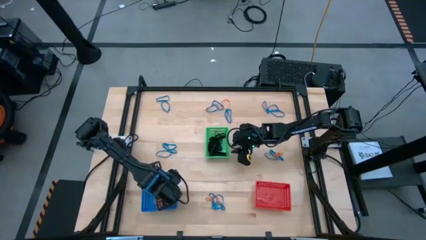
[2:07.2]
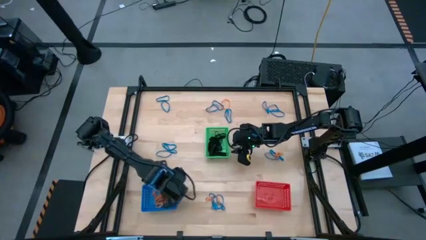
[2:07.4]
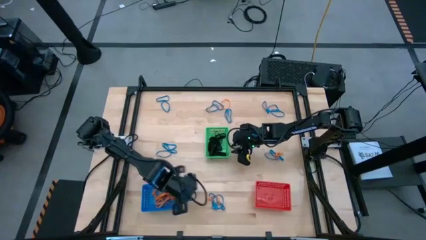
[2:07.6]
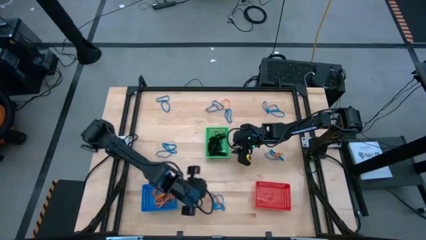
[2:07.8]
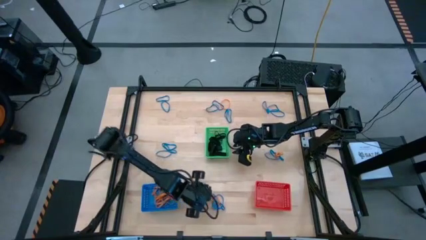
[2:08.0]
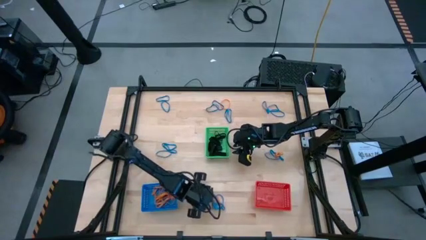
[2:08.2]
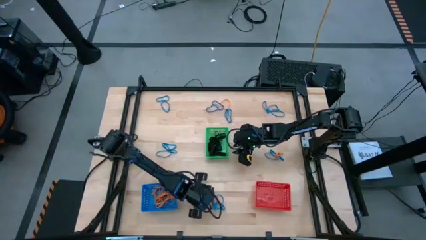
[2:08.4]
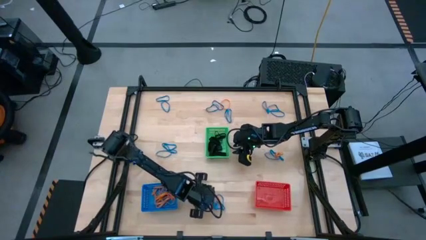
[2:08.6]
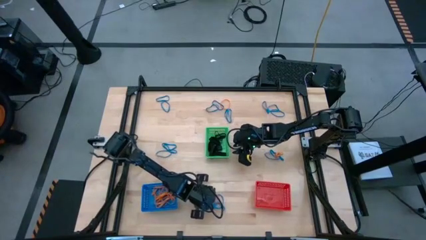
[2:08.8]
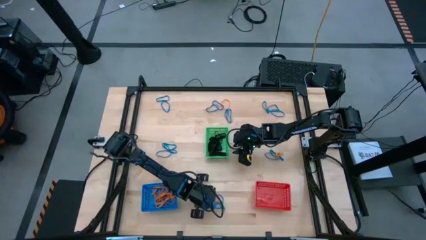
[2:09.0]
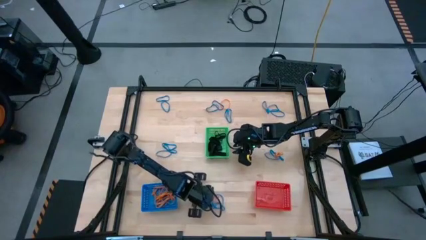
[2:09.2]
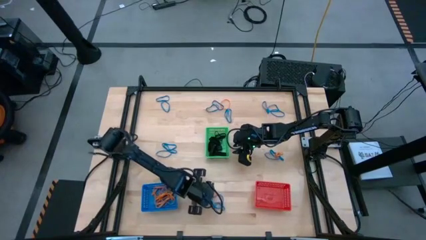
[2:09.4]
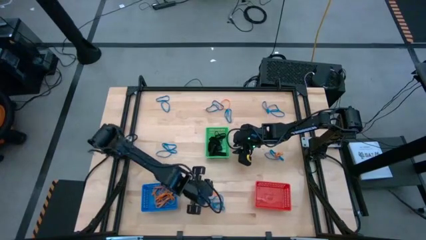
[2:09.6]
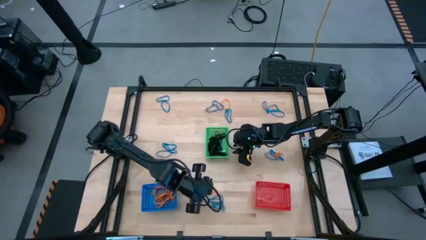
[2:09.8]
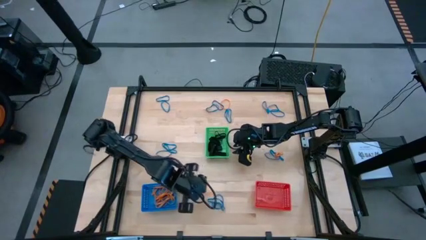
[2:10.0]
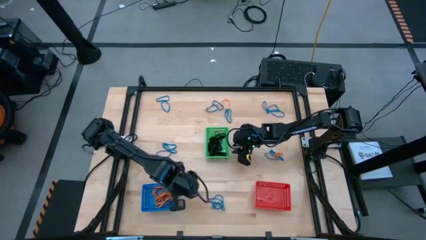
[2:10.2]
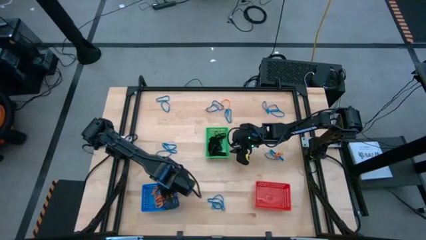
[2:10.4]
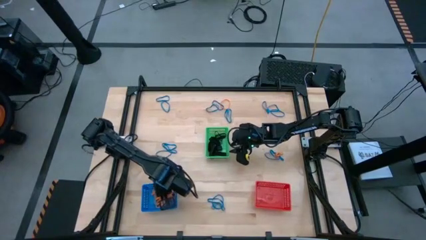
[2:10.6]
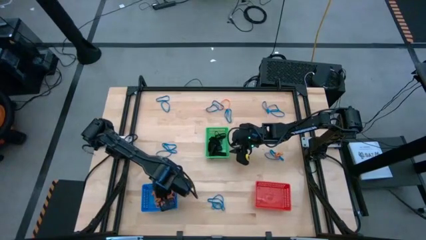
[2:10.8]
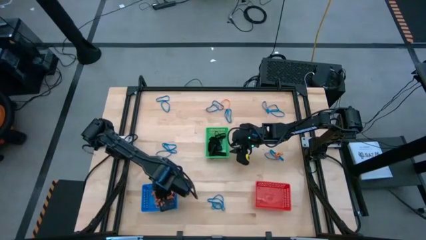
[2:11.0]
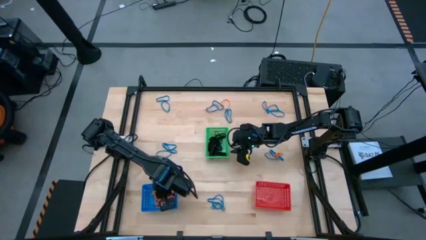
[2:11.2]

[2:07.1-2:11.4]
Task: Sort rubber bands into baskets
Put the orange rubber band into the blue bin

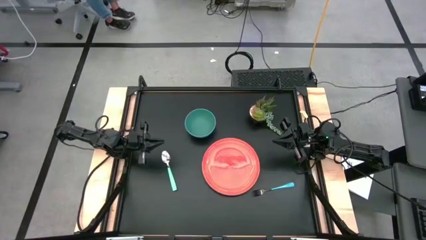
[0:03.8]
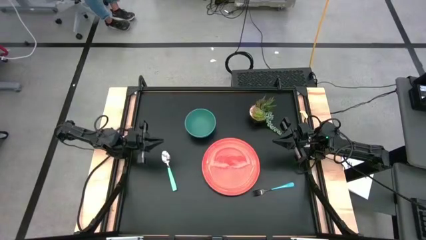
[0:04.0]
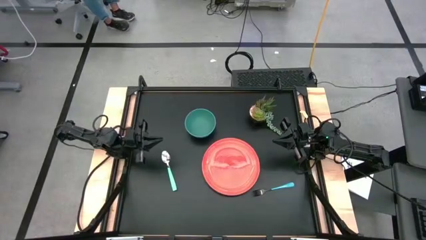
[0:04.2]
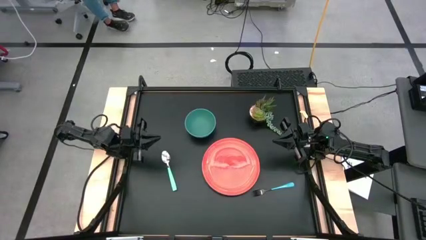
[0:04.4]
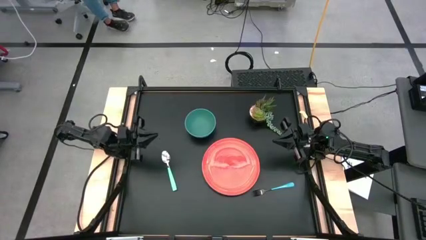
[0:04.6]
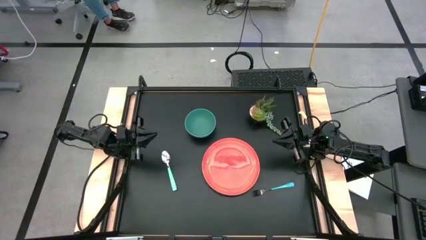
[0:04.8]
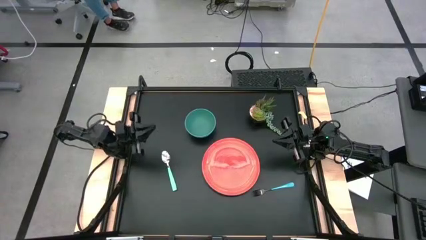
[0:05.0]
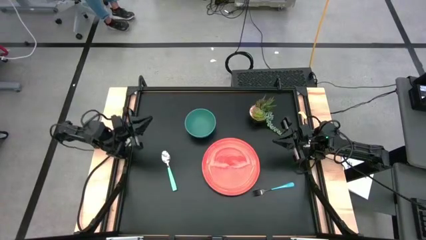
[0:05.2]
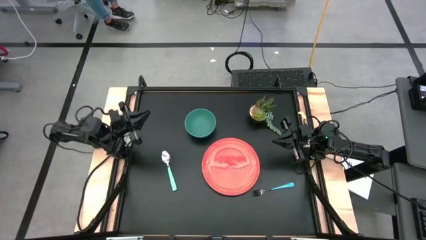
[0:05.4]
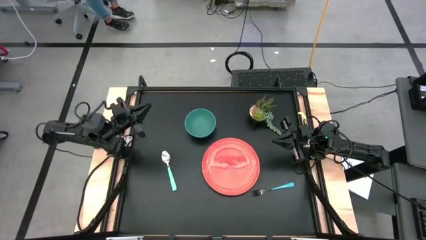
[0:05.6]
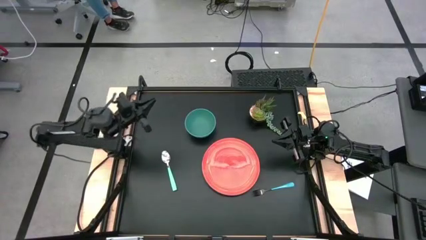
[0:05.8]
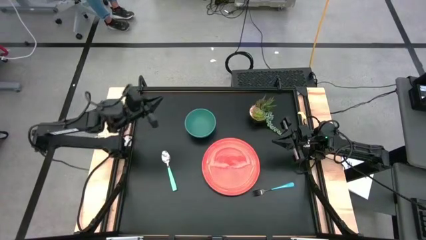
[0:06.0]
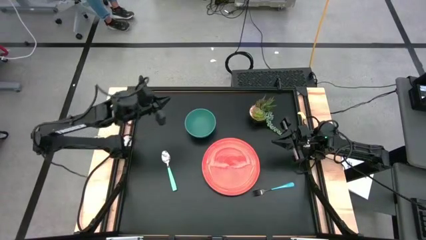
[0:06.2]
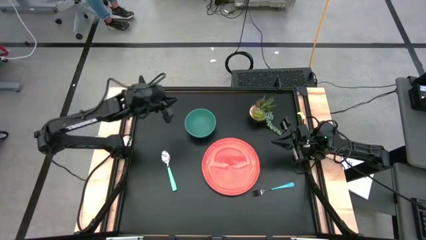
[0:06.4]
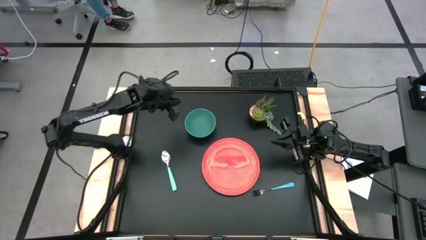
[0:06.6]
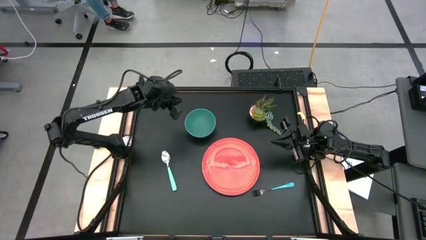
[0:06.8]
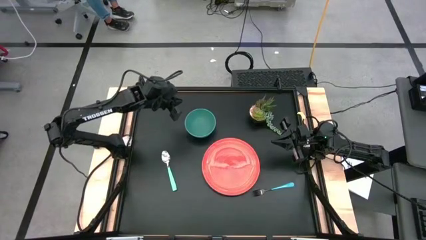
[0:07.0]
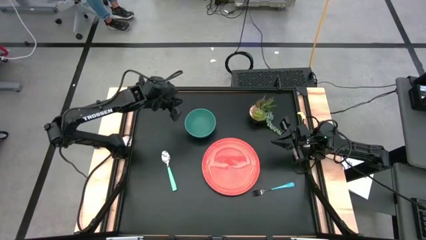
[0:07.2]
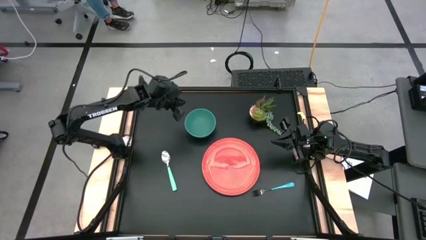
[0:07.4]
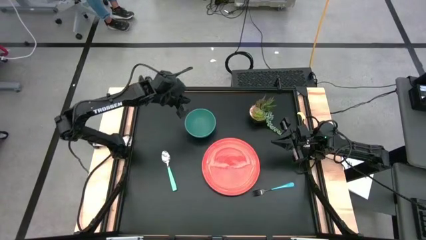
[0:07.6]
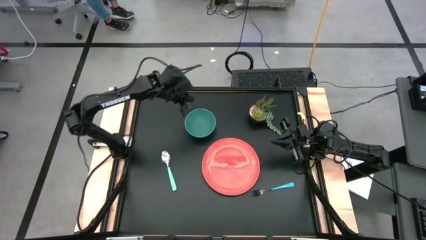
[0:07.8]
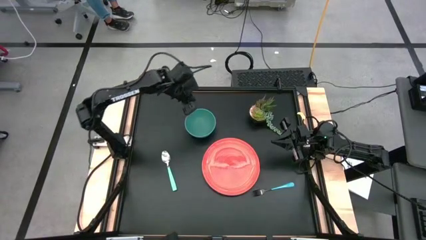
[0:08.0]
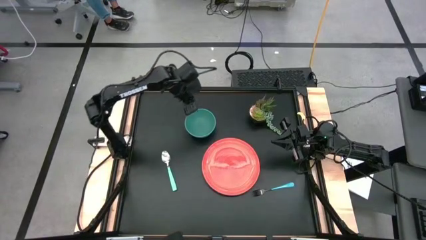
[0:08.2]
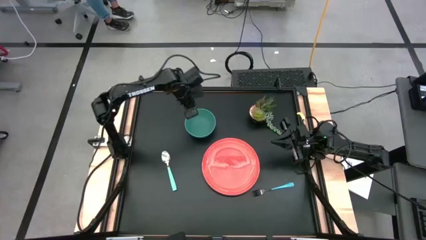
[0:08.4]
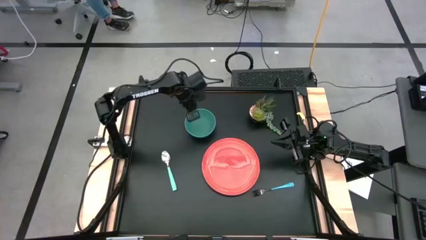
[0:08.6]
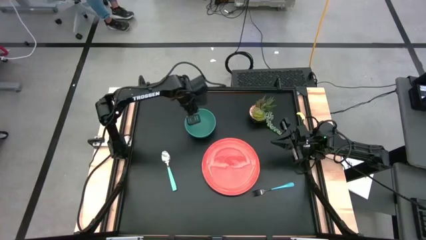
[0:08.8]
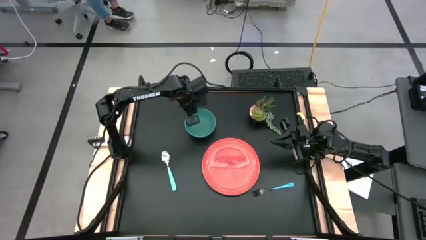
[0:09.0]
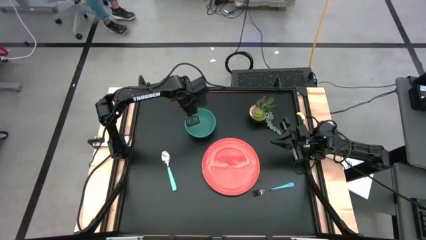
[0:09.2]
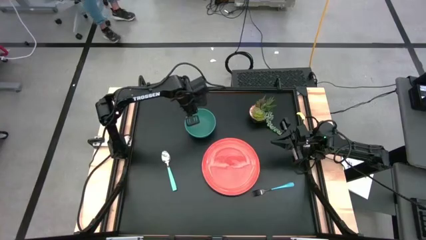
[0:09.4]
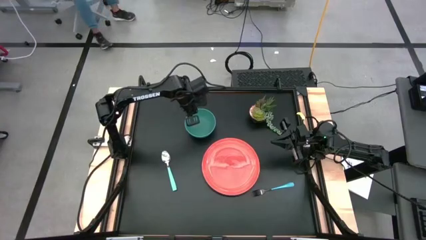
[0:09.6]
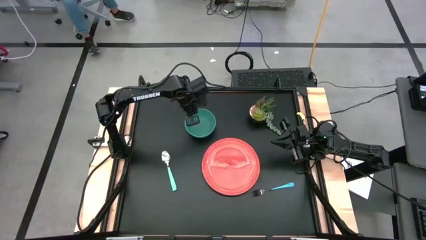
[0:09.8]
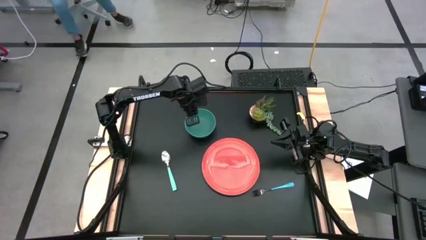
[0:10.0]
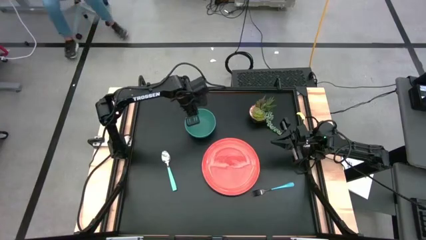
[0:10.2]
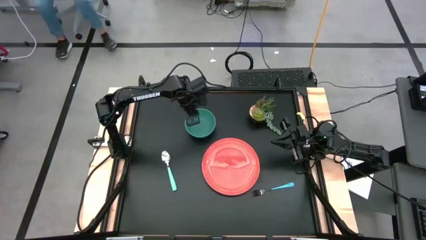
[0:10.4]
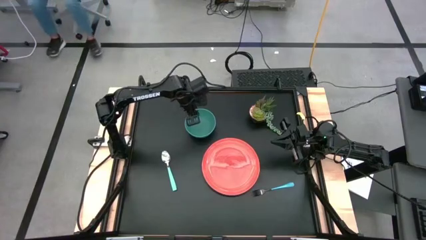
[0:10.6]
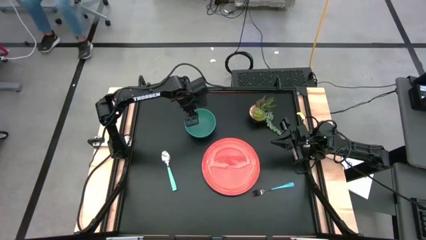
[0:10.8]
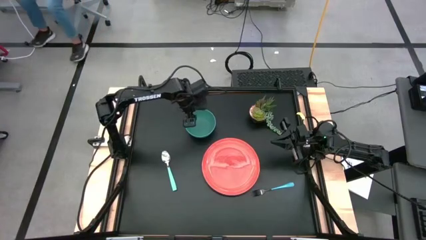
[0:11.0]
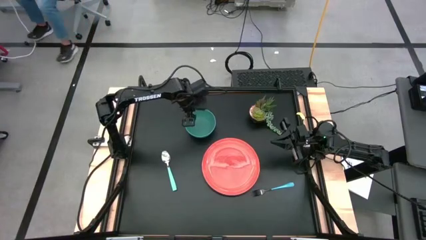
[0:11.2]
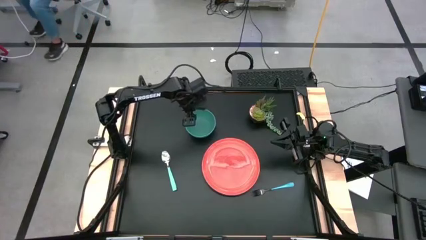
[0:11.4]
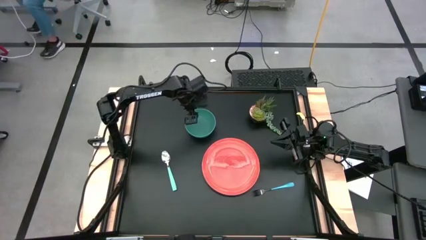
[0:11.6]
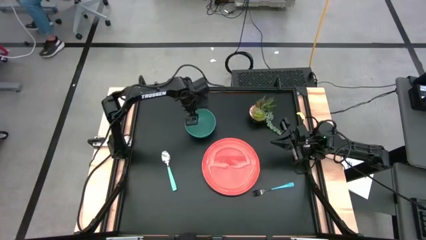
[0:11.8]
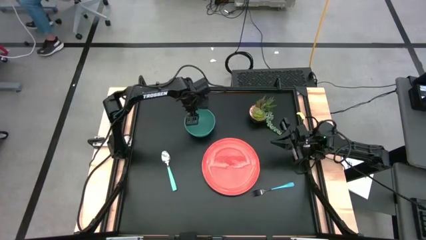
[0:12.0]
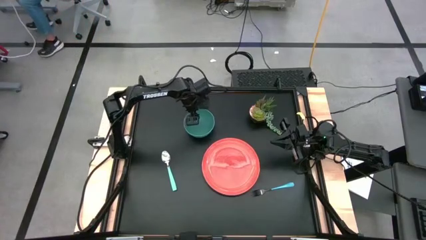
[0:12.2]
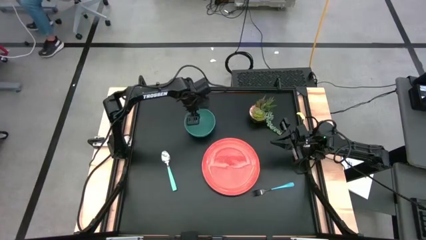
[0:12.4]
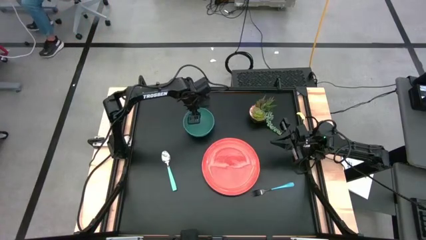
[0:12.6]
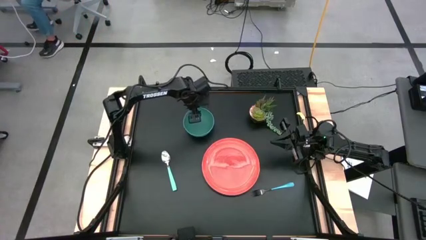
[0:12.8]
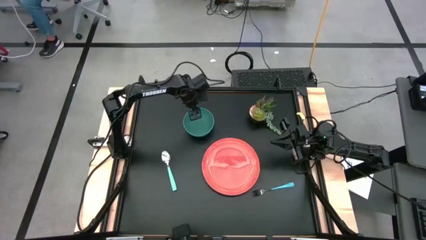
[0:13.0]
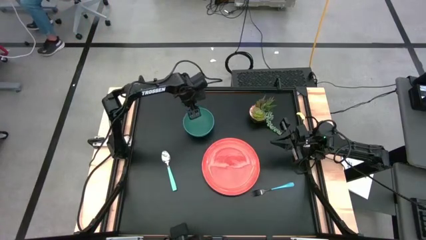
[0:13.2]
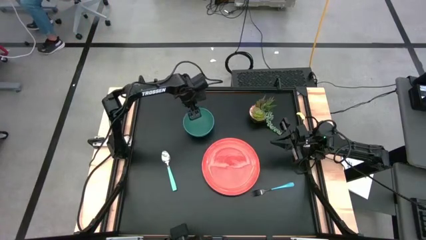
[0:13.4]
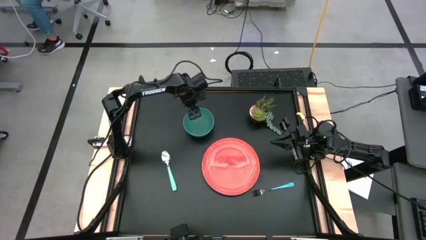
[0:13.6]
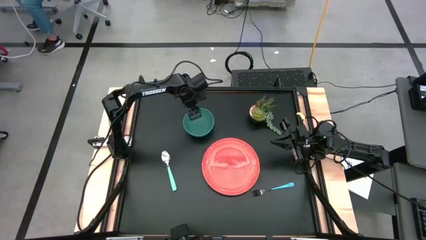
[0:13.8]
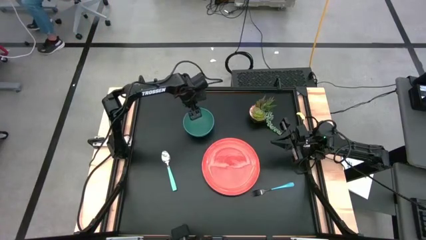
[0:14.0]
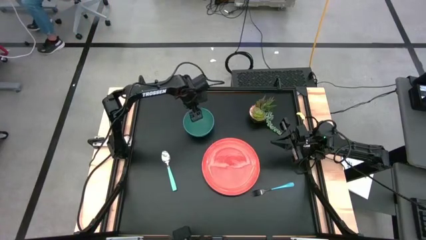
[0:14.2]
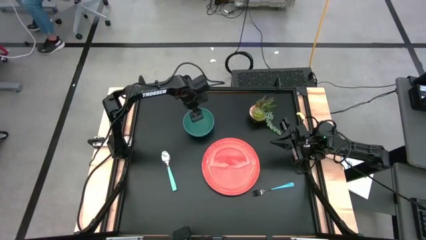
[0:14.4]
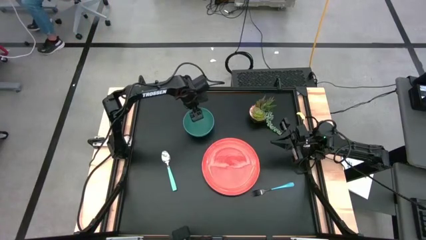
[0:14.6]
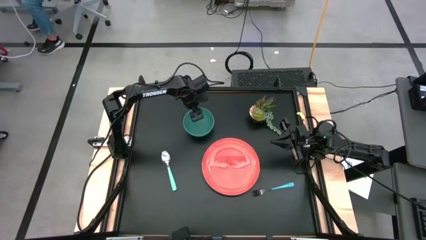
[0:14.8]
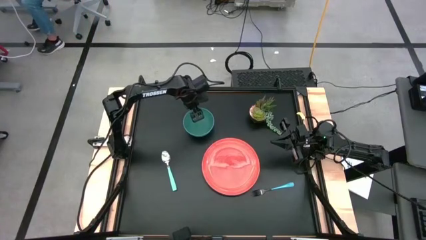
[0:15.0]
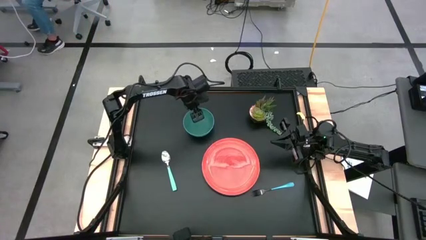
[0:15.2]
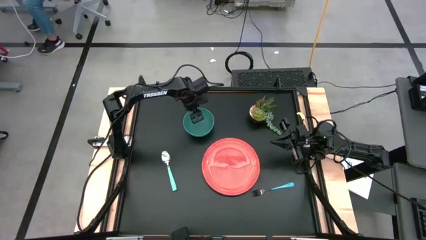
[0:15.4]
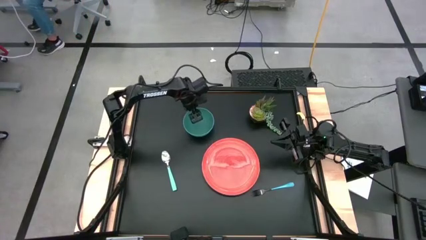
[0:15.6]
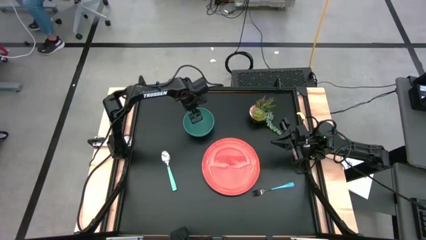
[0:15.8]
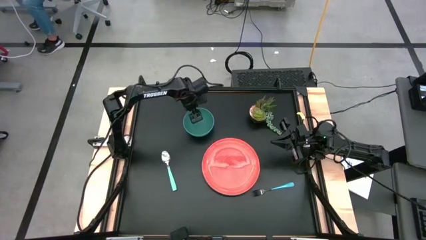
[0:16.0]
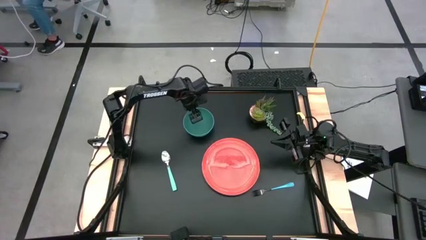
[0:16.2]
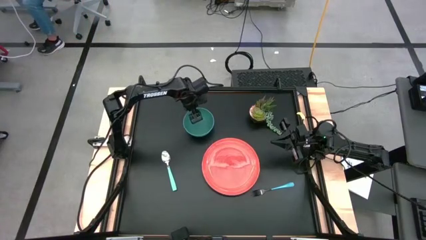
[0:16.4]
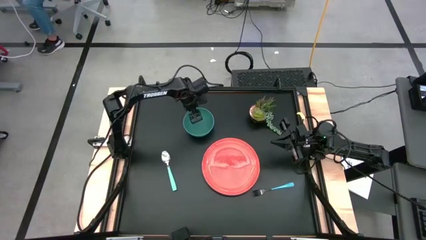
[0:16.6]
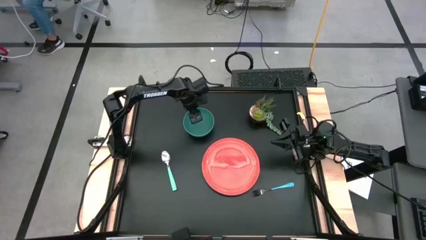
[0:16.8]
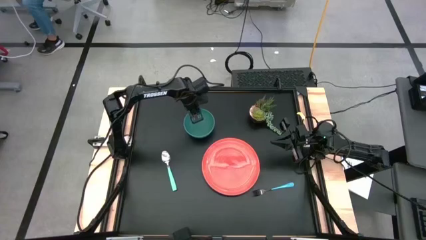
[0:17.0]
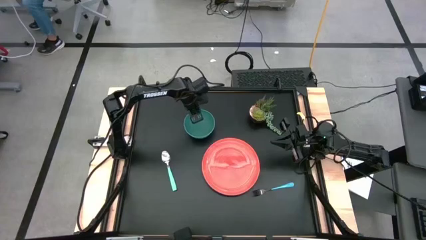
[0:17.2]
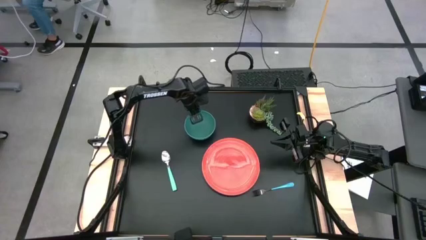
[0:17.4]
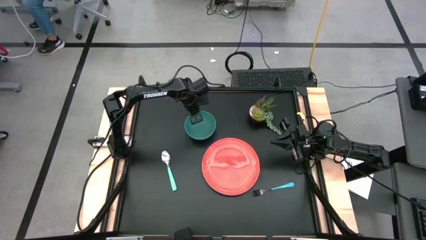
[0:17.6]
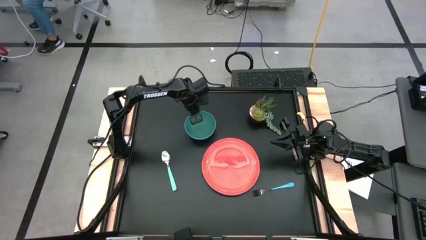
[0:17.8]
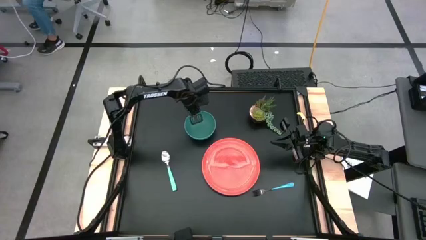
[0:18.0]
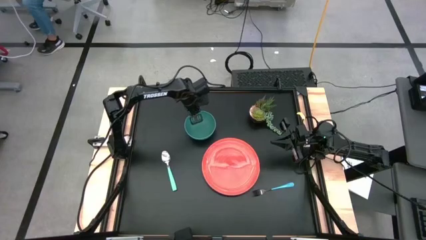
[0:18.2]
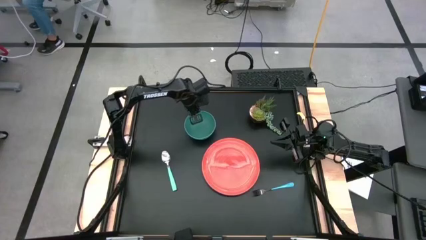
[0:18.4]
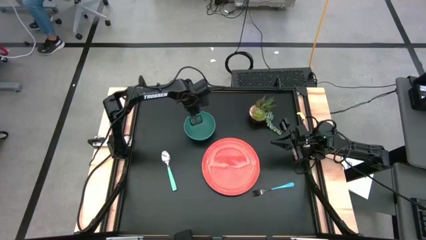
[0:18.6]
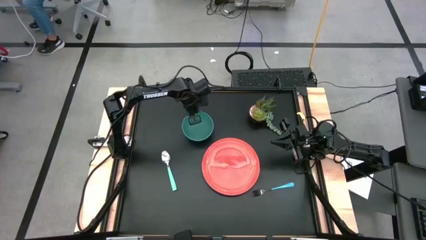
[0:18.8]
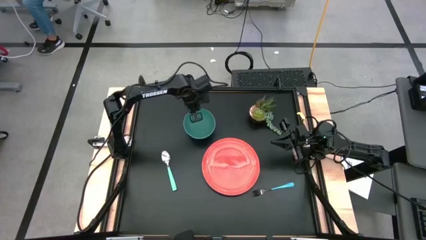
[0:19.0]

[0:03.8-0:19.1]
Task: Set table place
Put the green bowl on the orange plate
